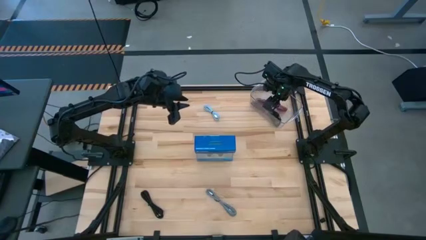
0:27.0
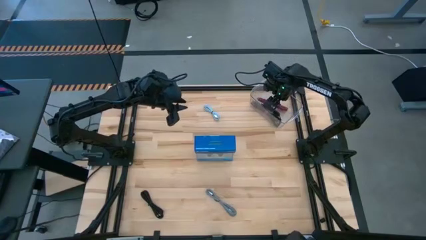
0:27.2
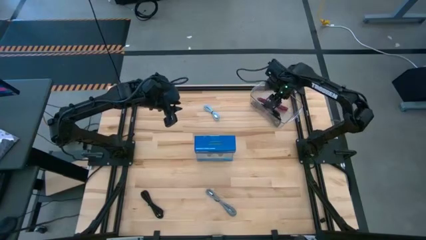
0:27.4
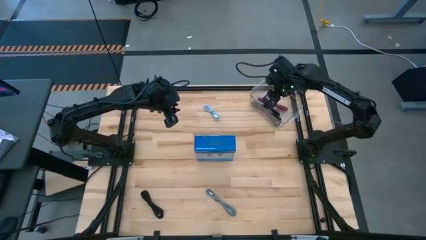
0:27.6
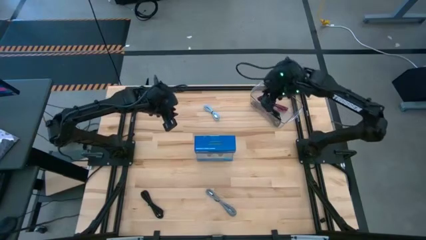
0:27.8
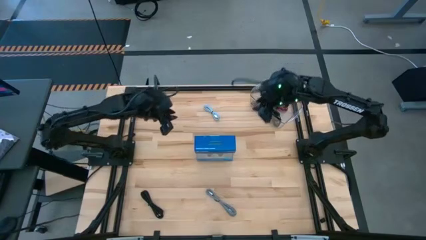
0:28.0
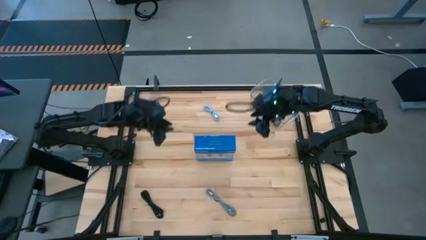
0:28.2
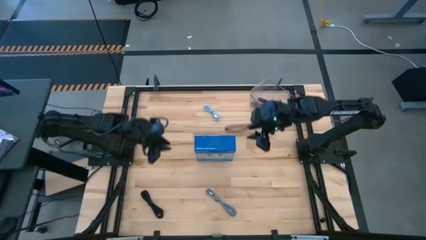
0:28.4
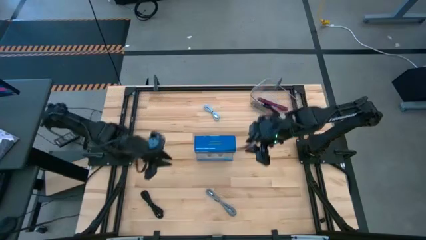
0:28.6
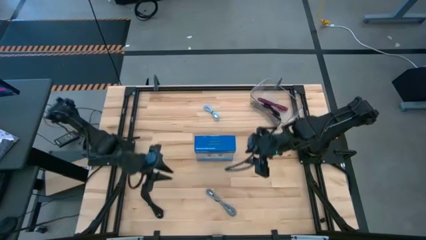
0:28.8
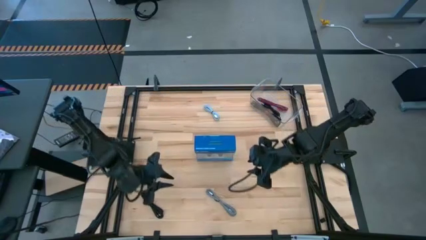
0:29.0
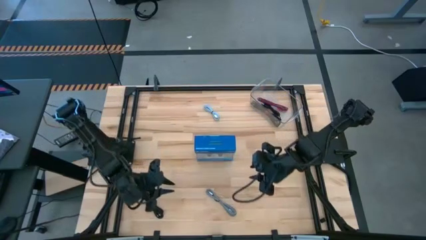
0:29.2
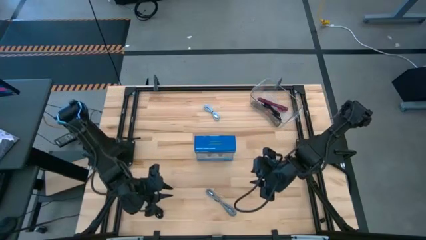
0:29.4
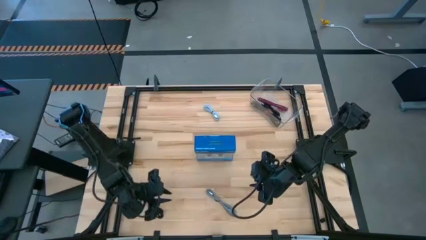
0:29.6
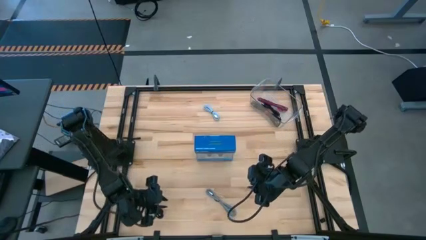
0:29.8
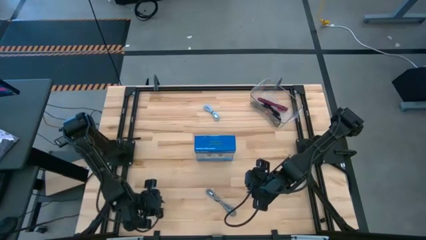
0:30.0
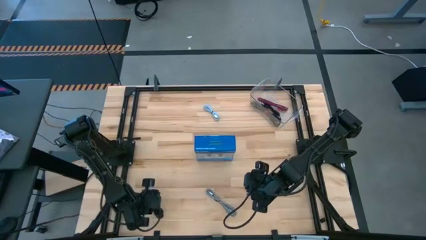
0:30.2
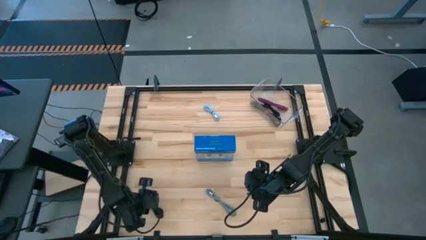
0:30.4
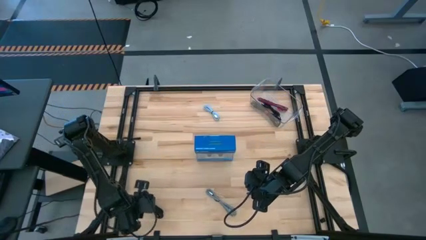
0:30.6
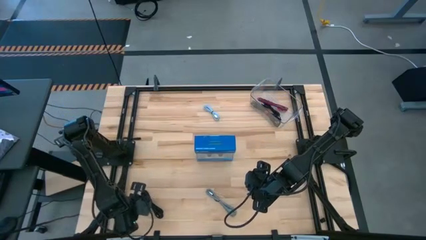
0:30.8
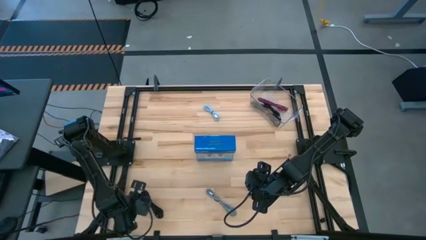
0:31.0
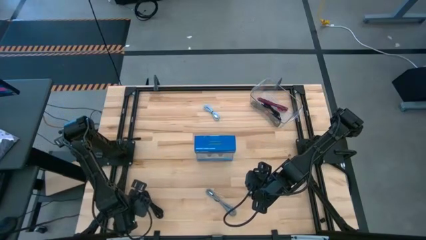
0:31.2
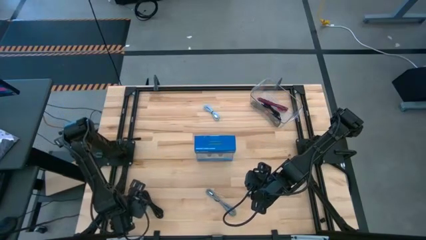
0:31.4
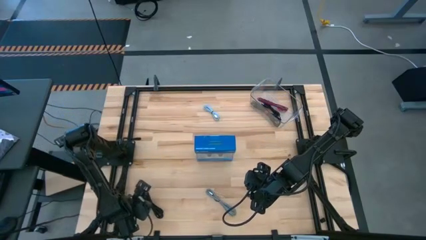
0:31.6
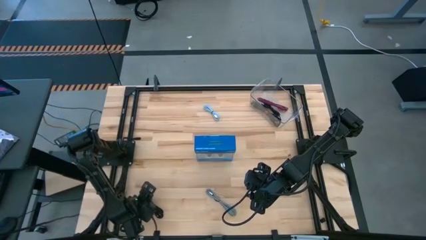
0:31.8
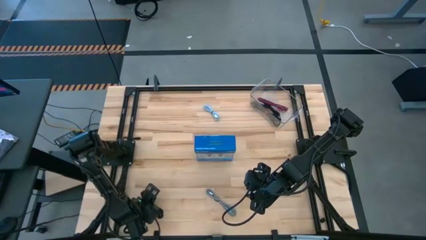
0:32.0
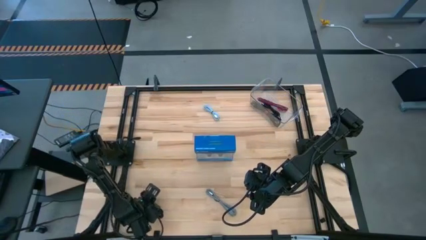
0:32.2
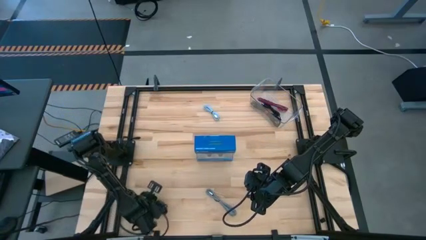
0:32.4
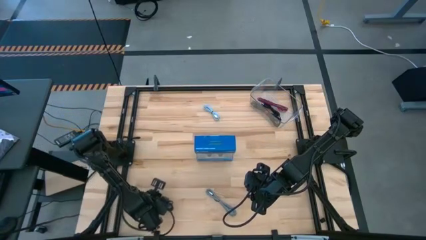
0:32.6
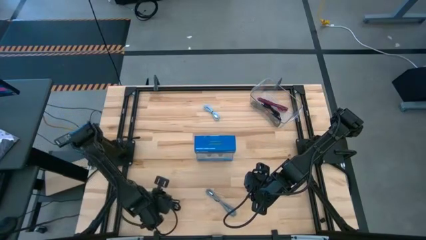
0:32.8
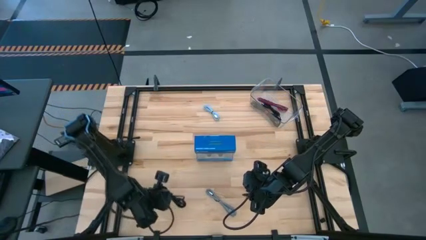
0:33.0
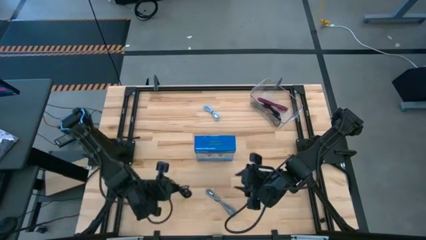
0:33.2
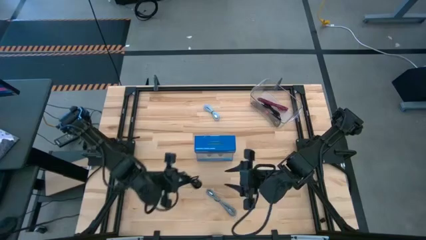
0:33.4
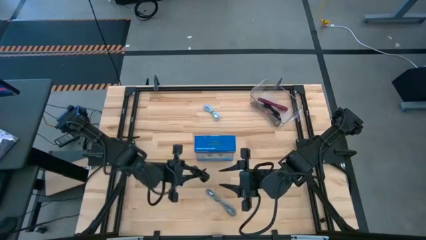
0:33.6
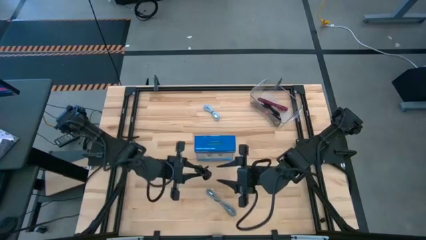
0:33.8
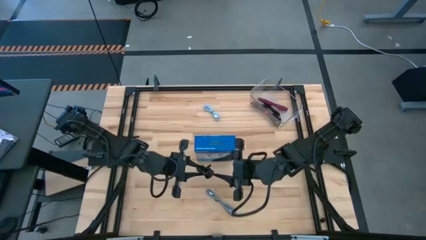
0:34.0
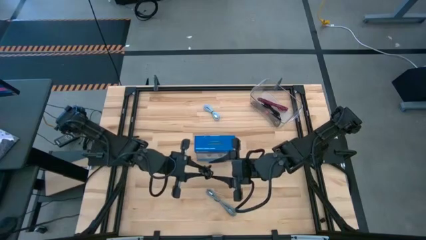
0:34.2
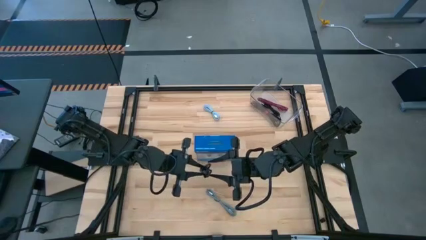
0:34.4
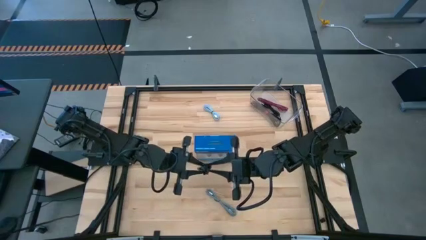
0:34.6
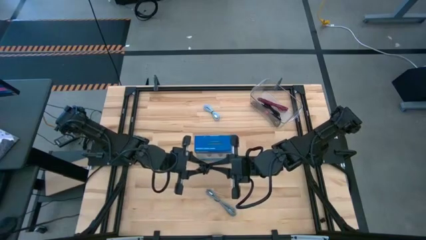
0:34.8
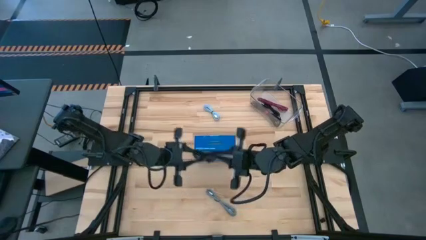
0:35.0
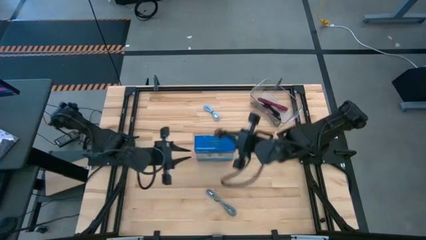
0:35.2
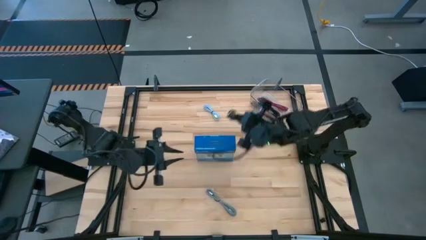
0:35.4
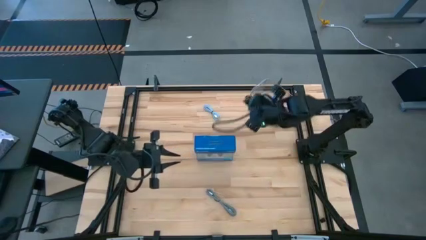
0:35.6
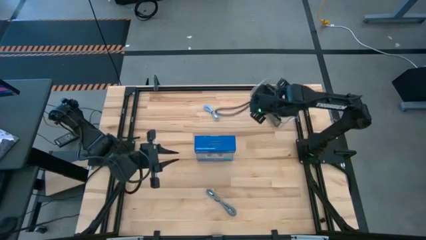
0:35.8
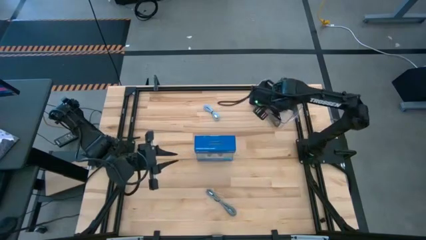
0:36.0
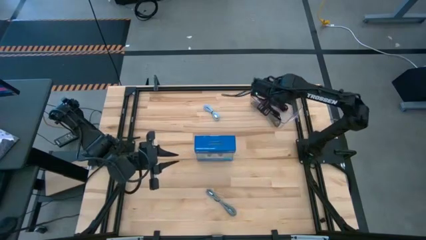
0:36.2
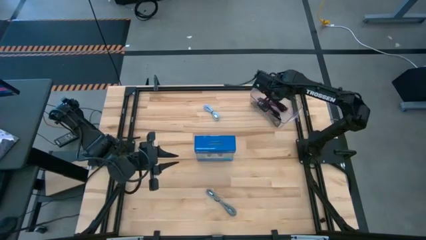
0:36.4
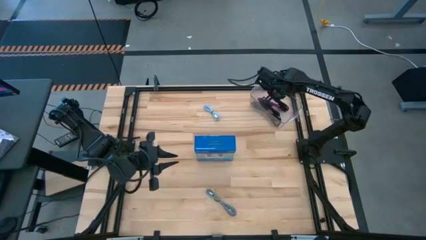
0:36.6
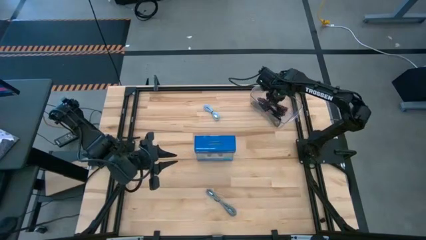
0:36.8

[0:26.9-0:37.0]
Task: Pick and place USB-C Cables
Put the black charger cable into the container

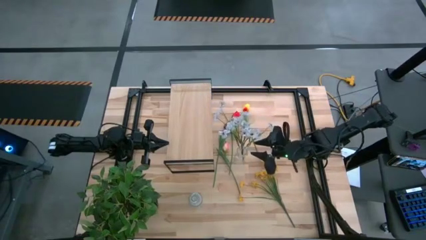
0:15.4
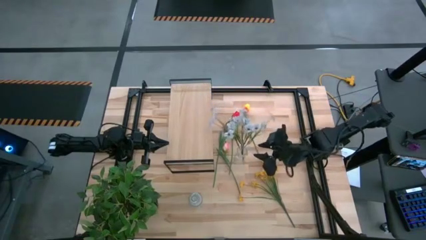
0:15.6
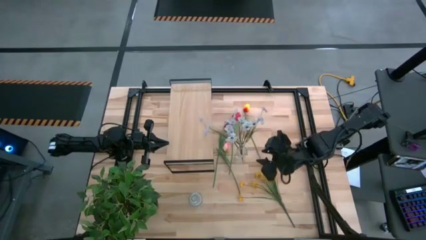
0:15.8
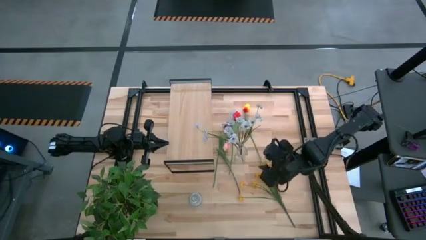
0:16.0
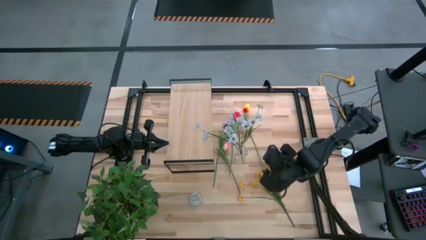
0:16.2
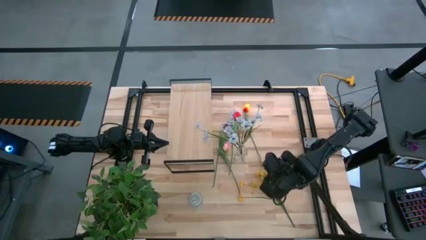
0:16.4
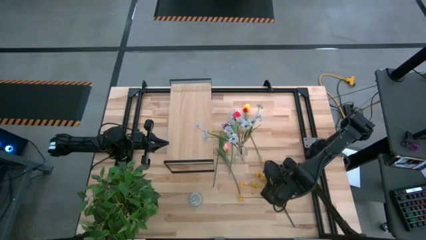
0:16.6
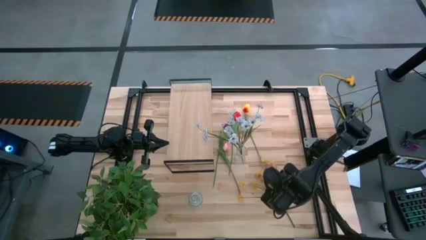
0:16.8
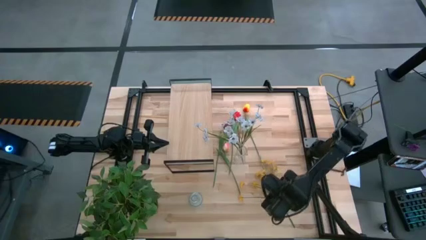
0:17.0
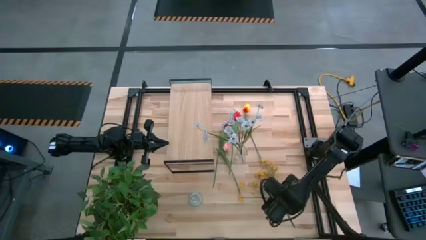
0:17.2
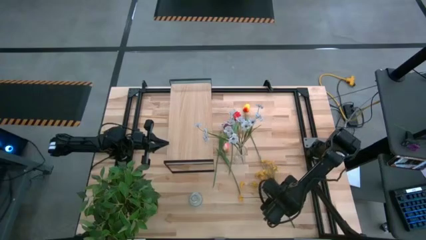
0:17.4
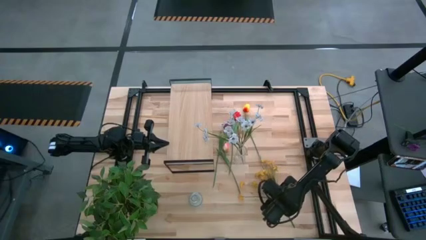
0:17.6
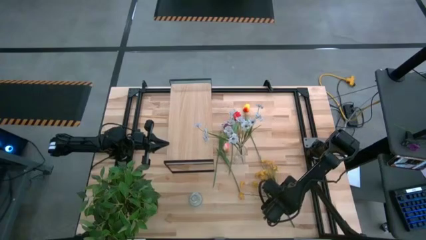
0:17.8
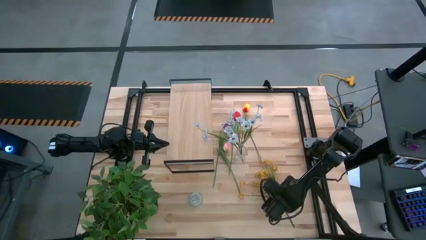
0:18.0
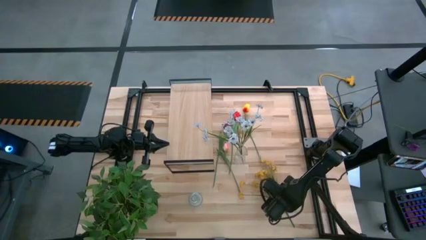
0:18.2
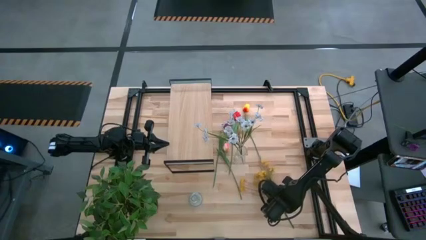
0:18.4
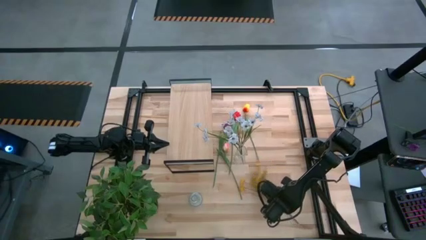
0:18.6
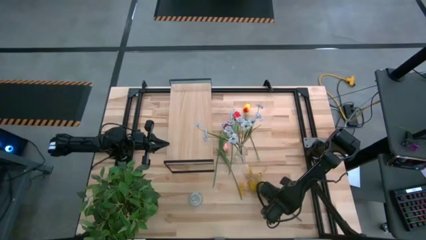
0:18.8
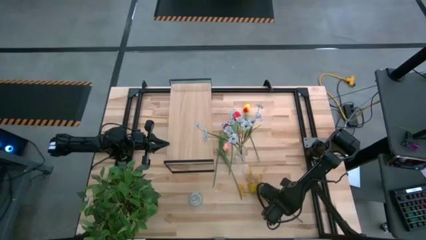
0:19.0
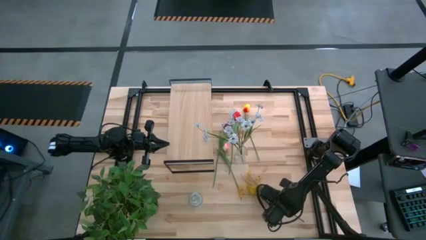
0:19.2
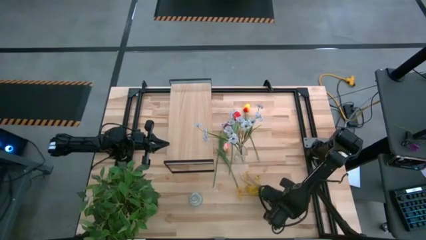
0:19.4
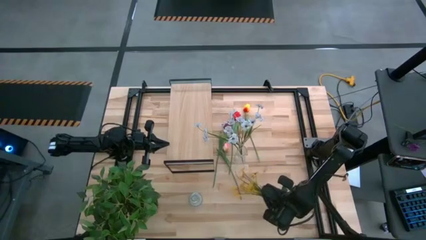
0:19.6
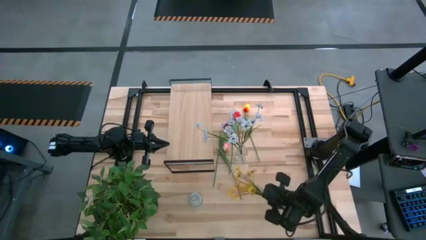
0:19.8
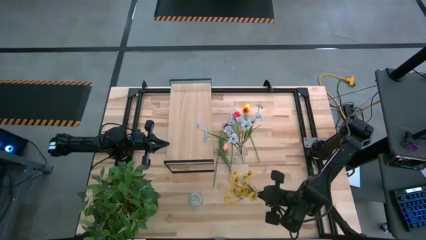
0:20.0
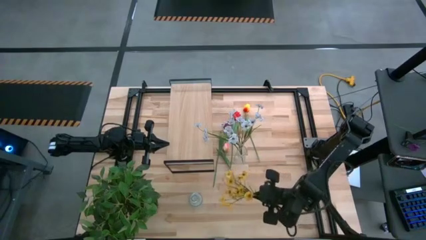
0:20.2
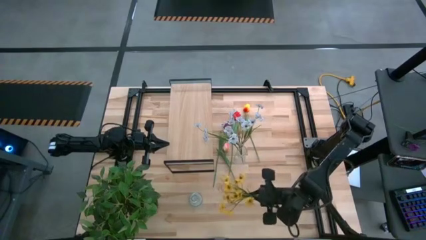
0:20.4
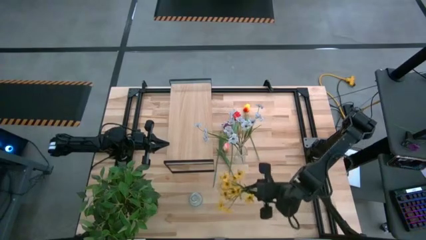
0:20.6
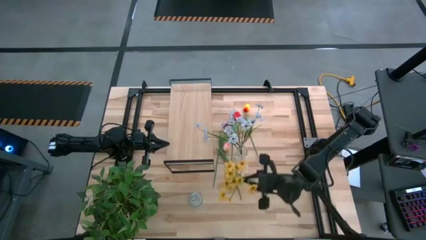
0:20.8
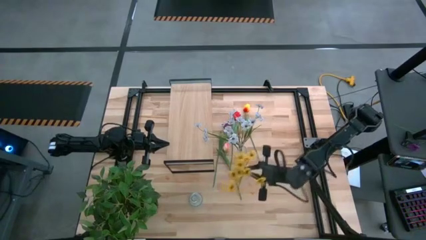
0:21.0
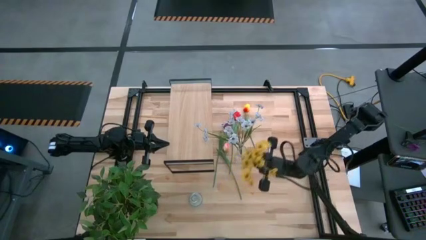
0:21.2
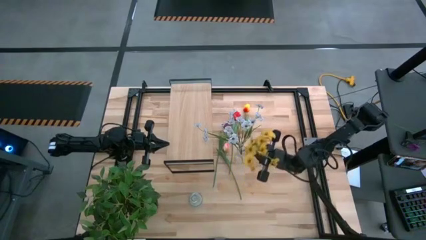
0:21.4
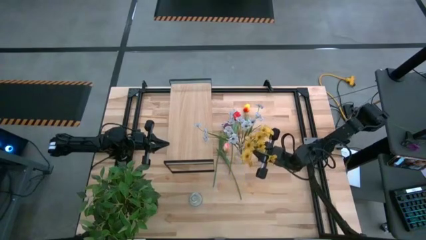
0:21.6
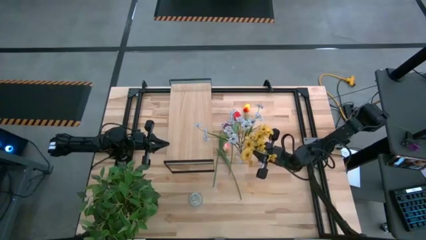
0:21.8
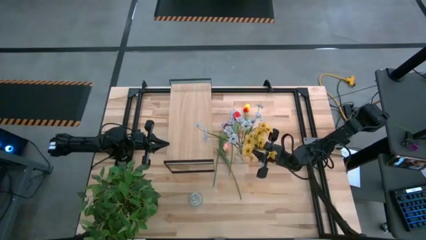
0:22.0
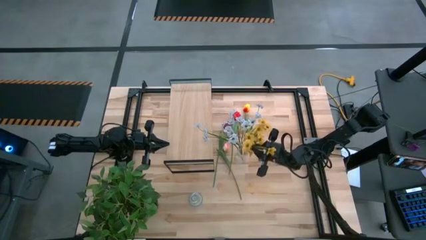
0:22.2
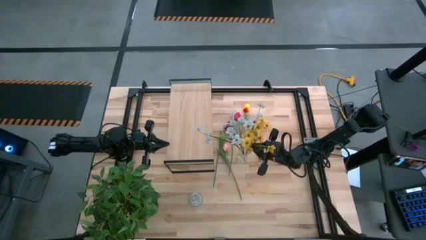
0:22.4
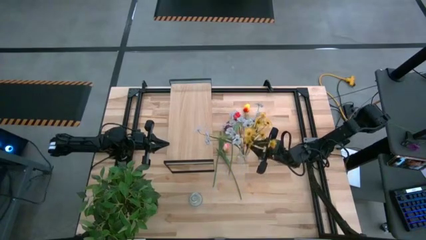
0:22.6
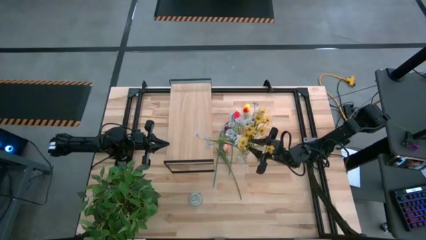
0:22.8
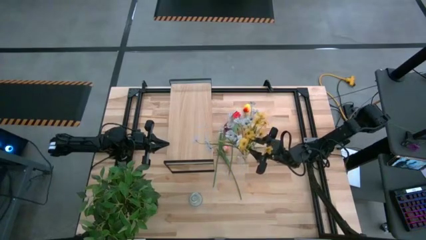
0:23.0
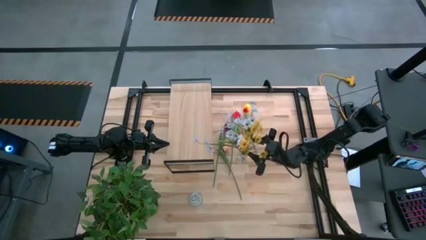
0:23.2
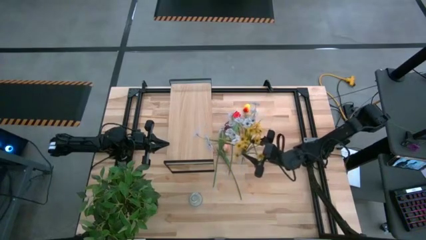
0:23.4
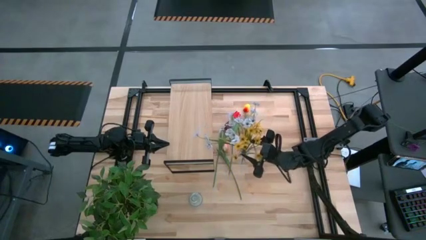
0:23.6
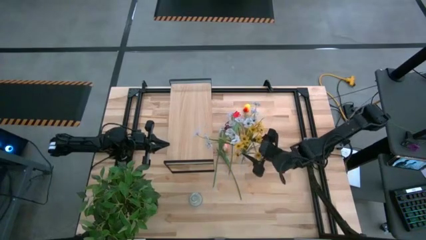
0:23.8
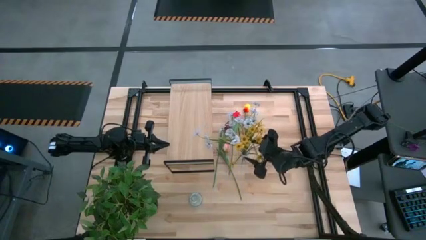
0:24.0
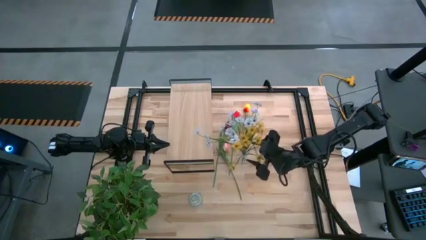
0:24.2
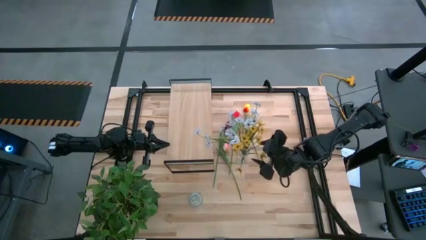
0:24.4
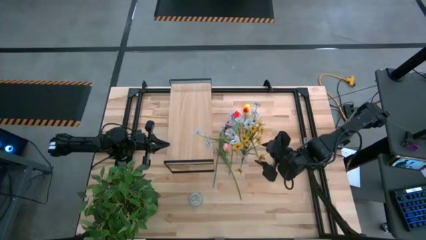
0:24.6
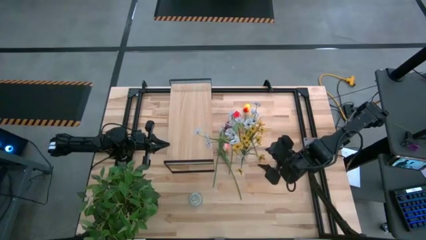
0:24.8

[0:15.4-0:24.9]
Task: Pick and place flowers into a vace then onto a shelf
Put the dark yellow flowers into the top transparent vase
